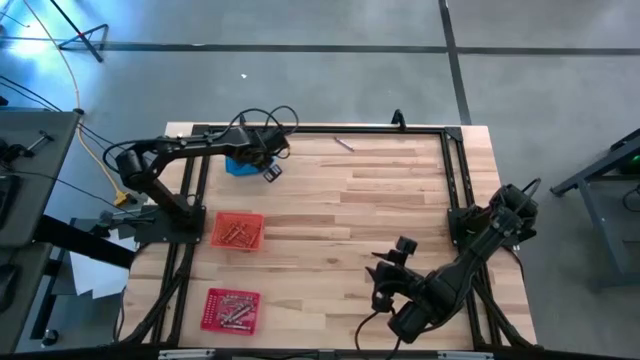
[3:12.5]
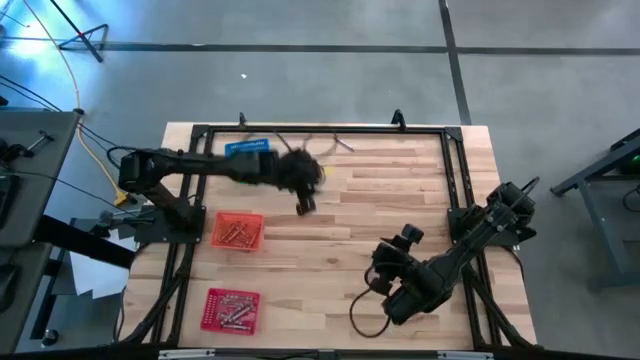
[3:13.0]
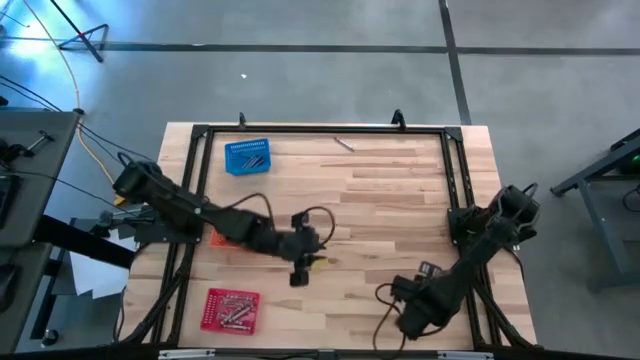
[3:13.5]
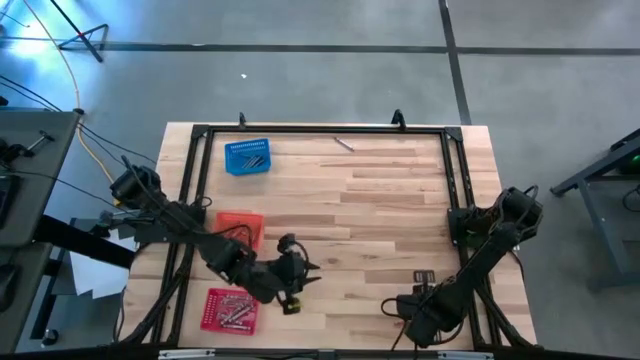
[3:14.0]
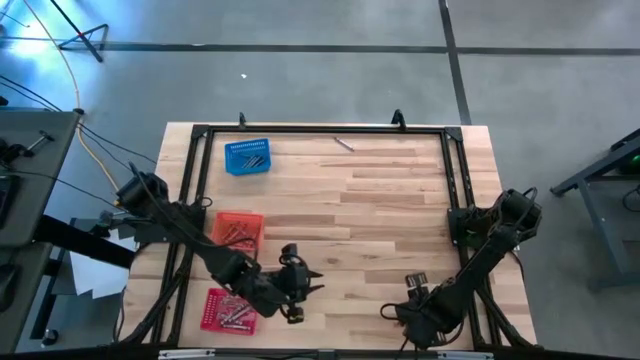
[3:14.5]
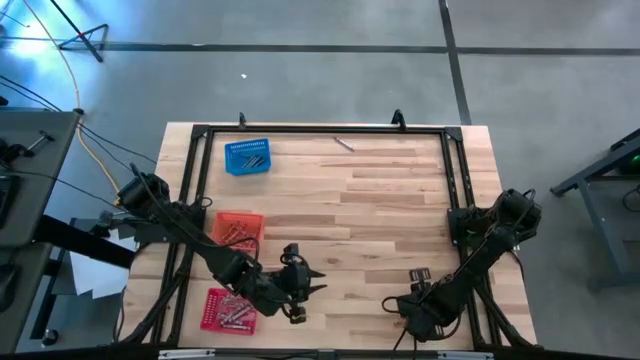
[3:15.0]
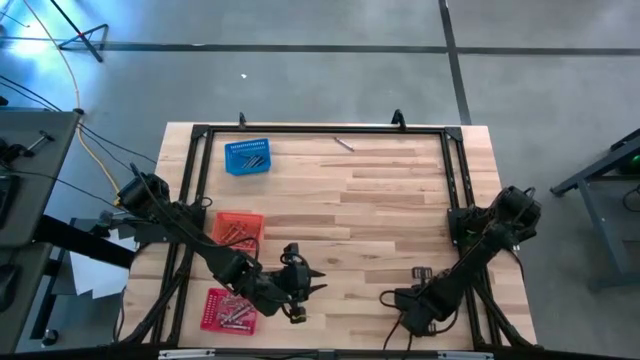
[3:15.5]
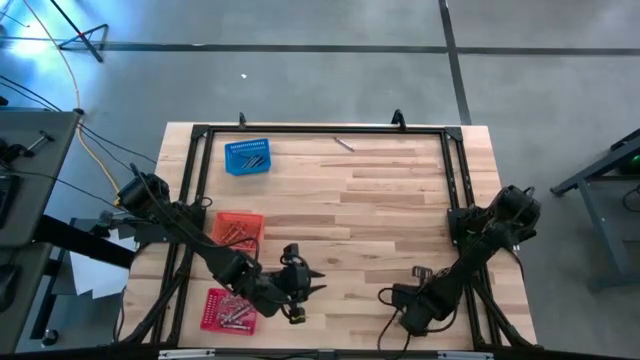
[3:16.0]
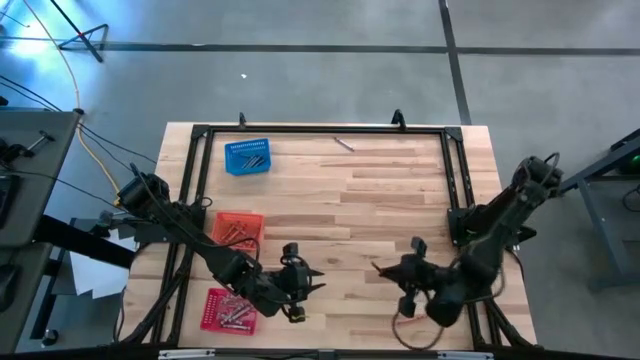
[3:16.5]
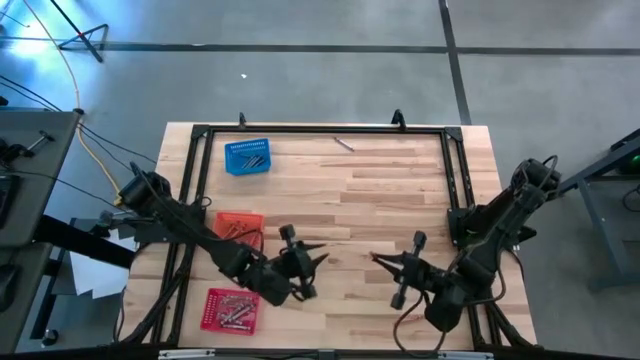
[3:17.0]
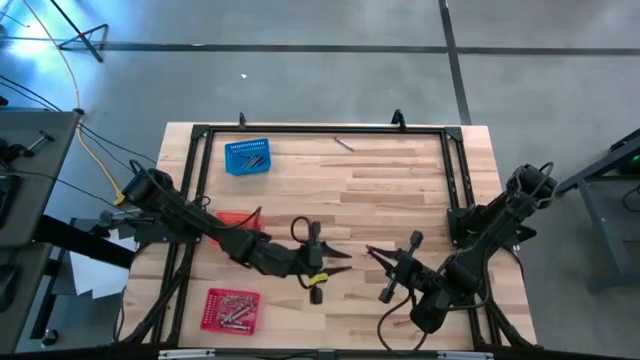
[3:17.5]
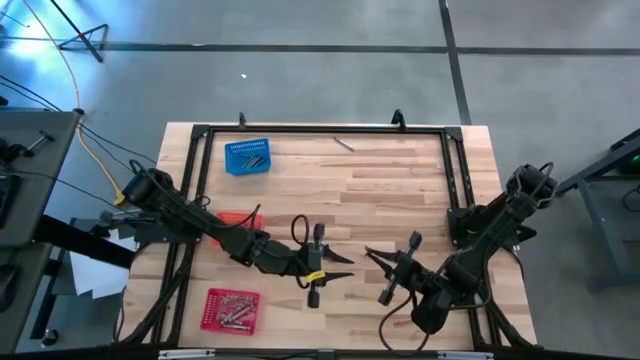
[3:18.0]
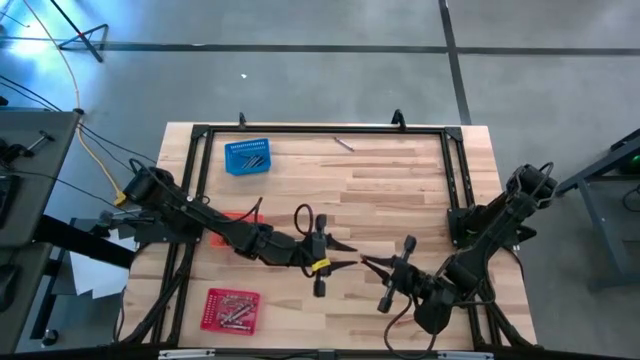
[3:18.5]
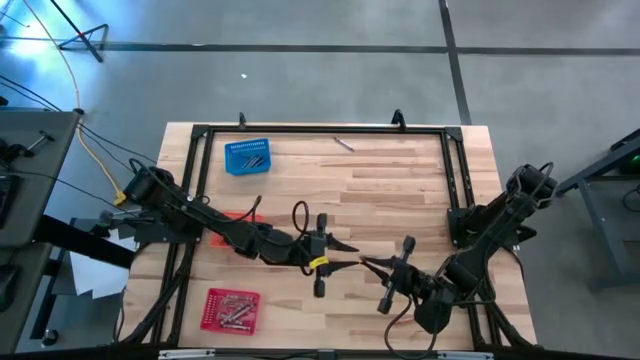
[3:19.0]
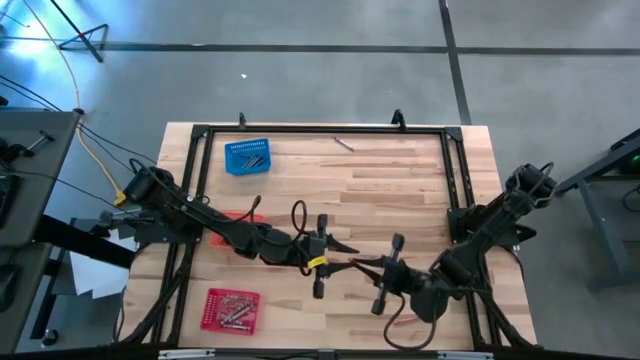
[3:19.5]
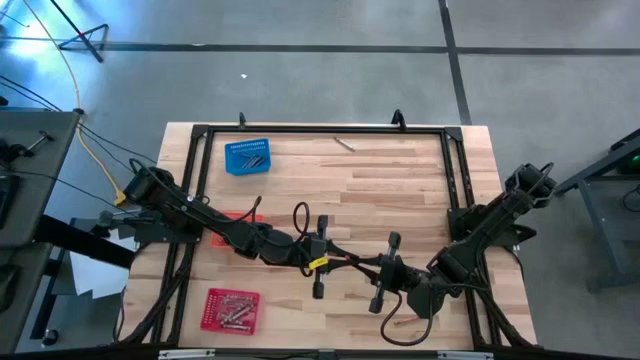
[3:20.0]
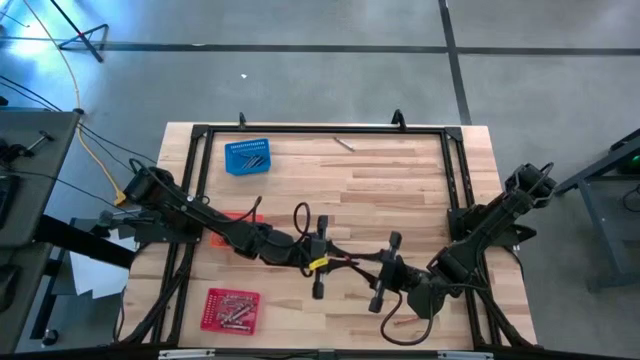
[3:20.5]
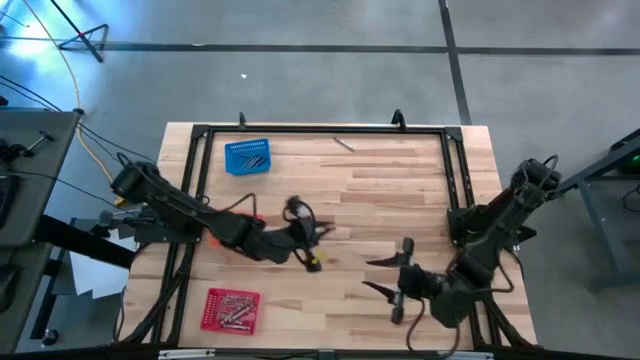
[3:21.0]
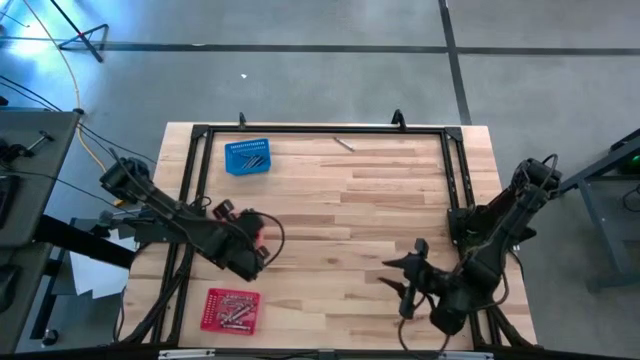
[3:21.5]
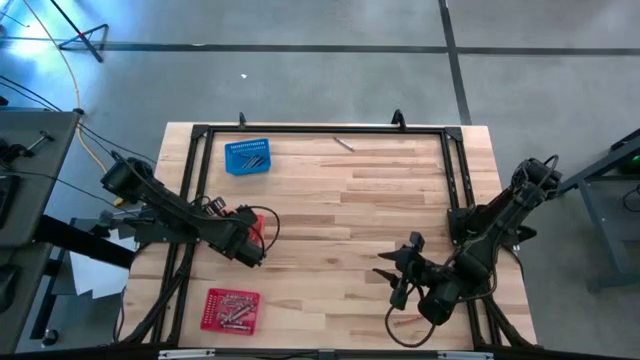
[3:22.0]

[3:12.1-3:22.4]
Task: Sort crayons
Put the orange crayon into the orange bin

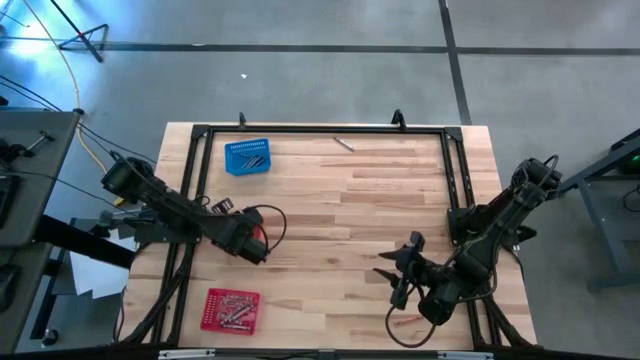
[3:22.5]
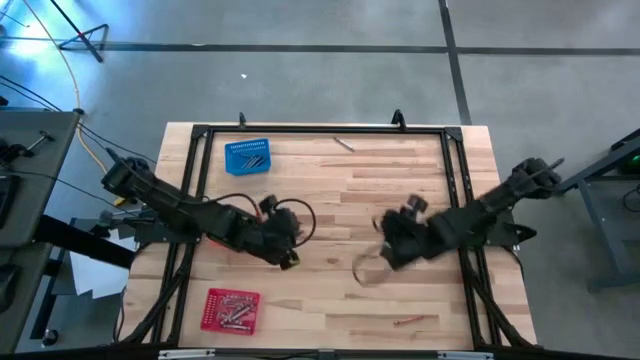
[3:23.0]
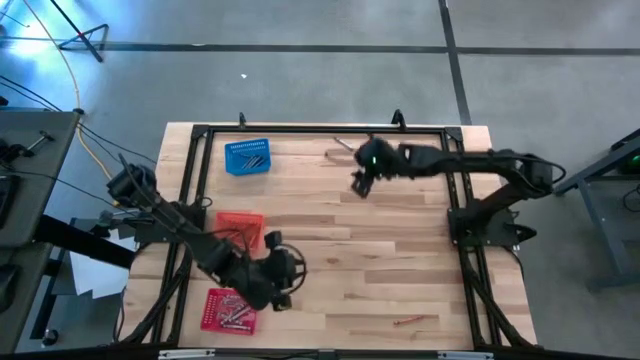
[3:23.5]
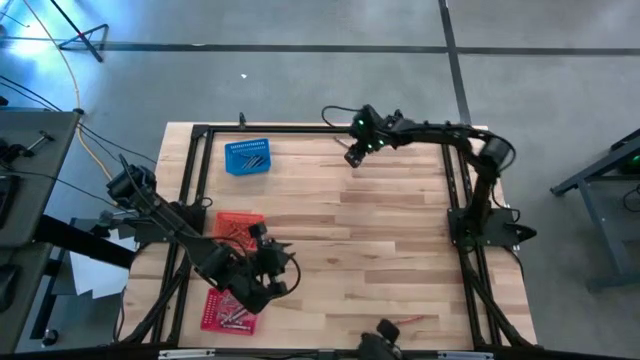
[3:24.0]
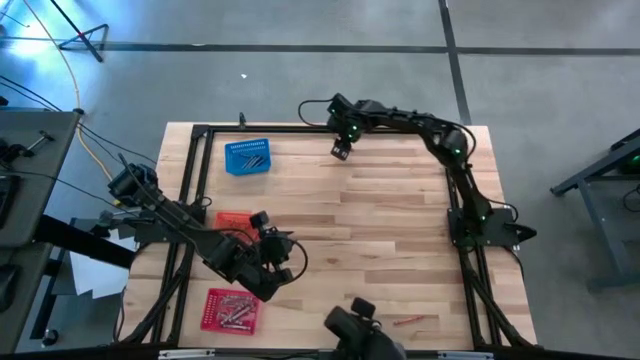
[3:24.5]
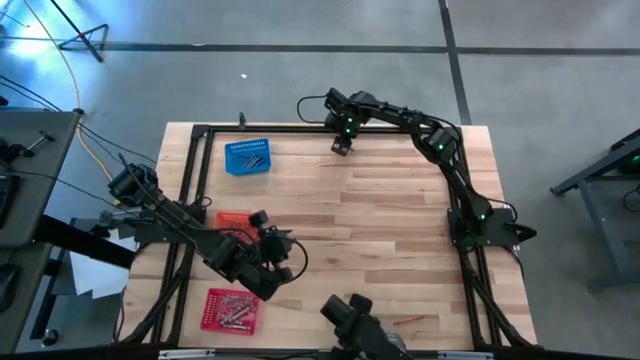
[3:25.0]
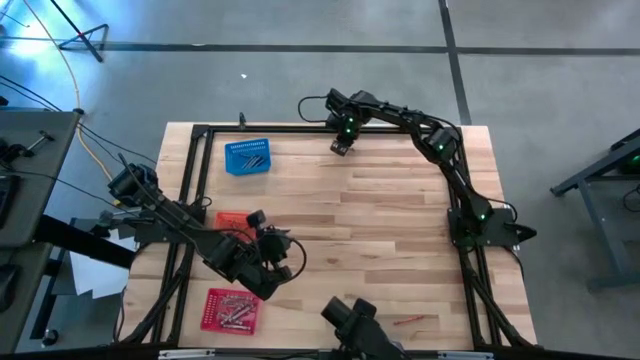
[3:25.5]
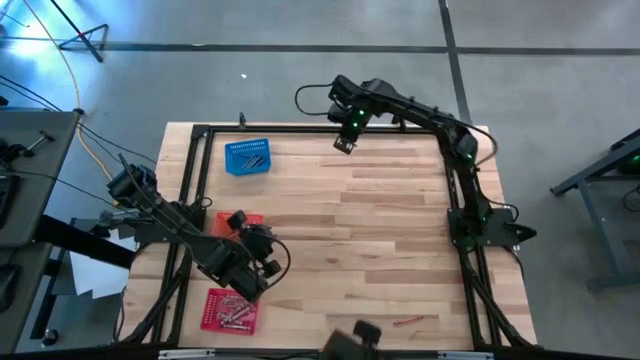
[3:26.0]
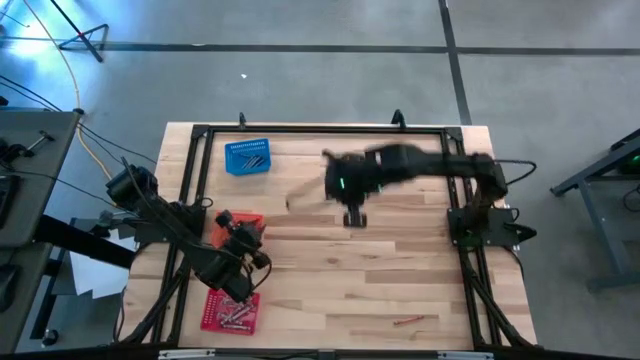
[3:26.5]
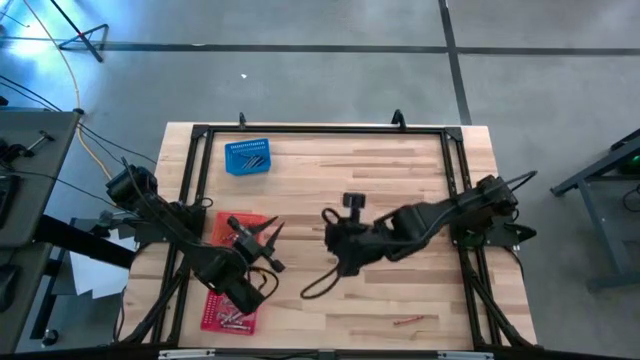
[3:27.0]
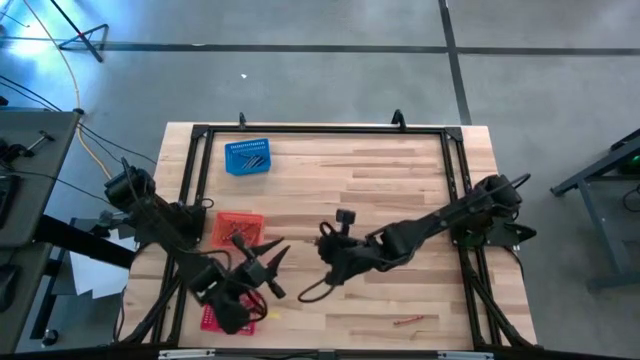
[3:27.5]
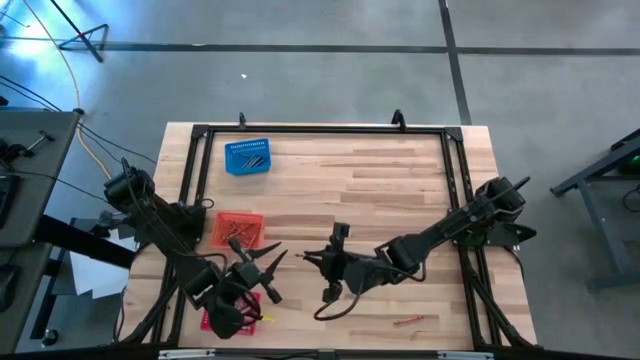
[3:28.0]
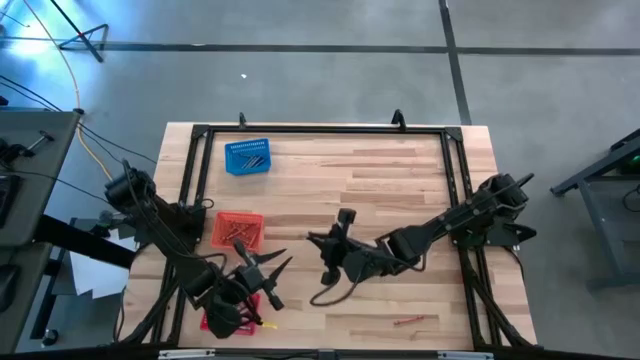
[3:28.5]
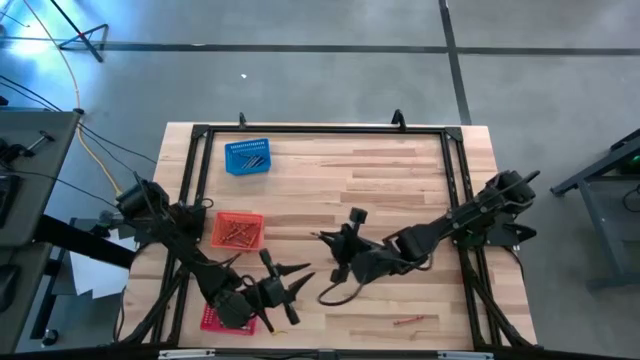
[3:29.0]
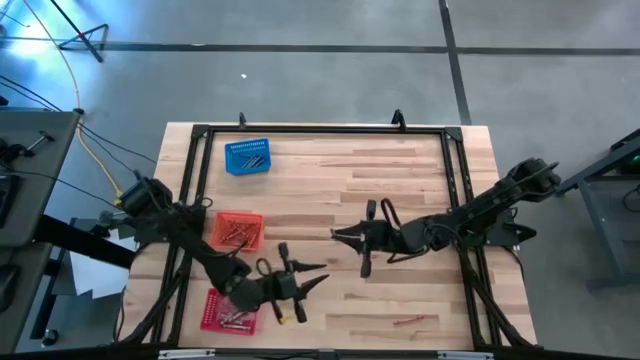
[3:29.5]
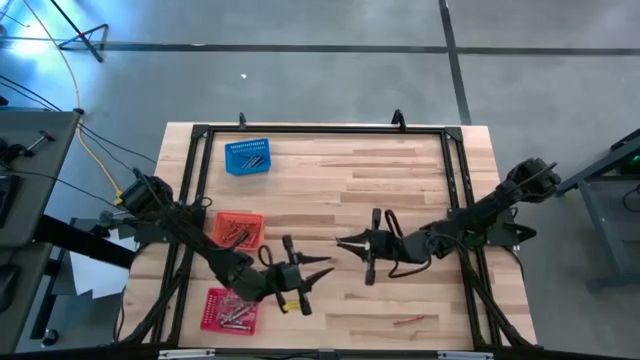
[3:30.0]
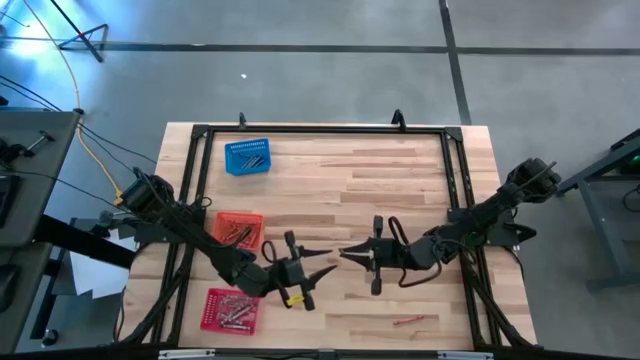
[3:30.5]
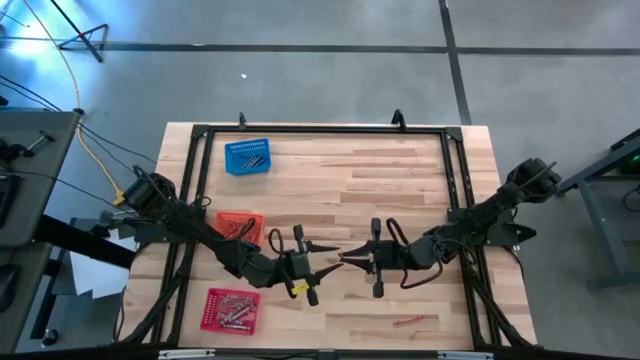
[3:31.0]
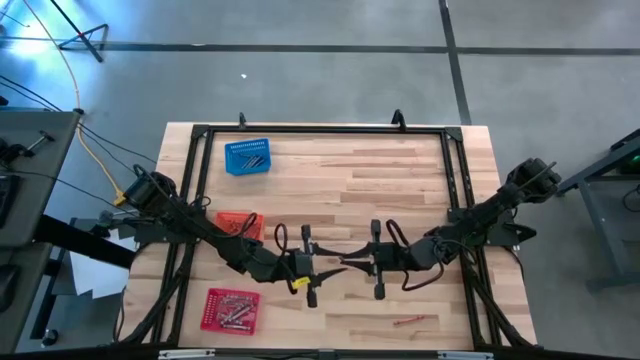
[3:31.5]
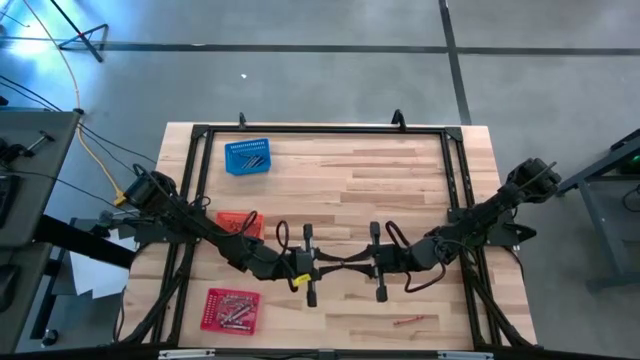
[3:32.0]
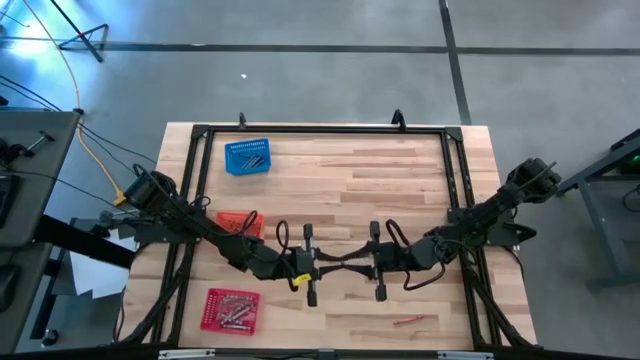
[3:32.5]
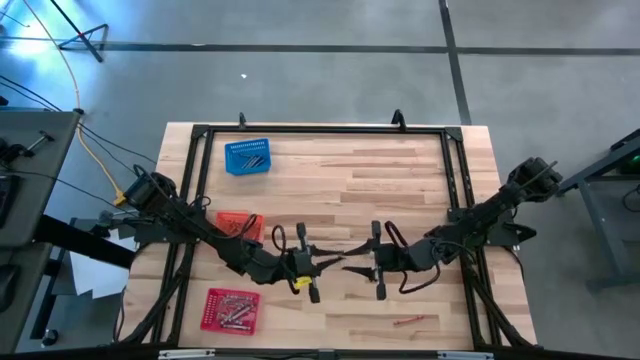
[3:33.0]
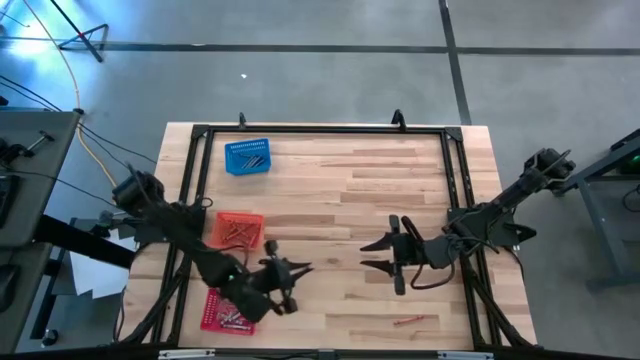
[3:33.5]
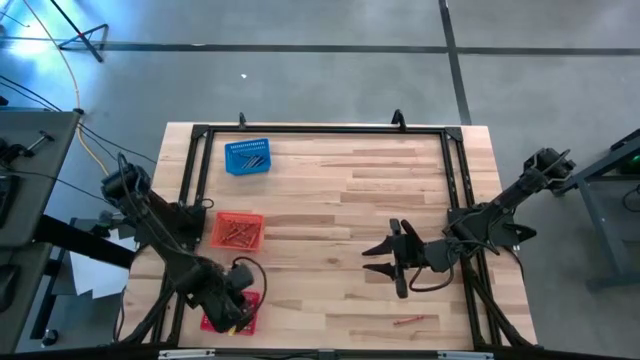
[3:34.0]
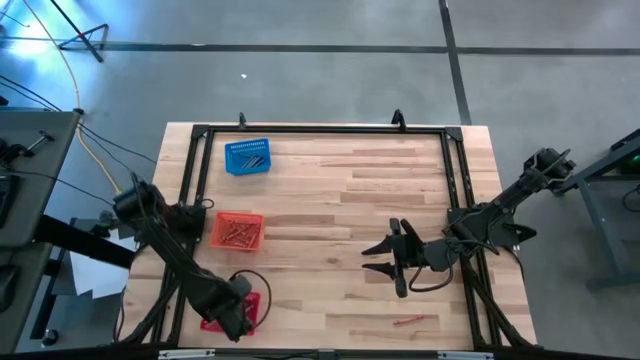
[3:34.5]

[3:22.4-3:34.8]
Put the gray crayon into the red bin
